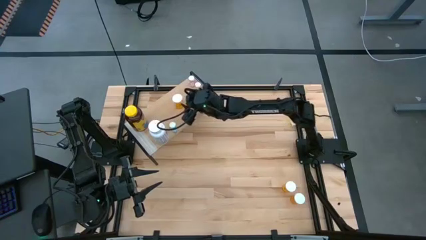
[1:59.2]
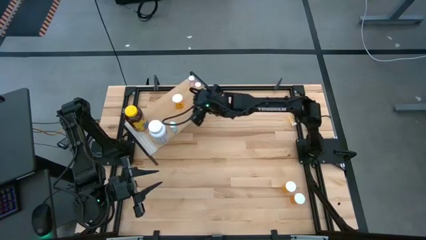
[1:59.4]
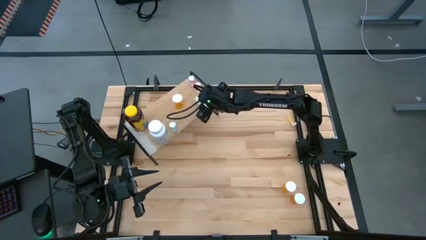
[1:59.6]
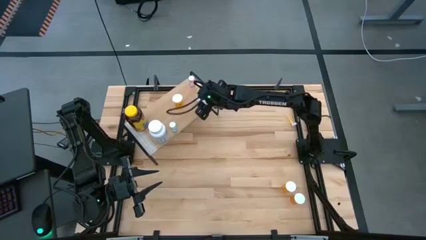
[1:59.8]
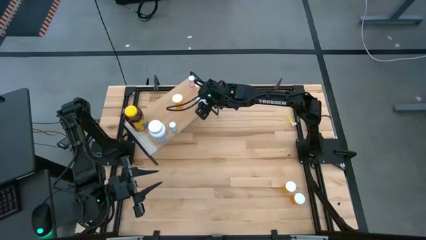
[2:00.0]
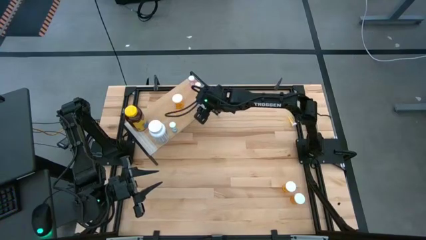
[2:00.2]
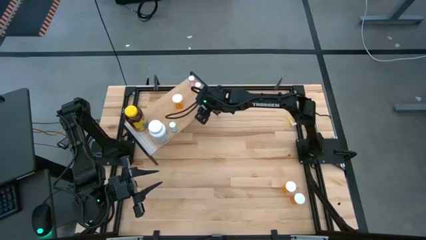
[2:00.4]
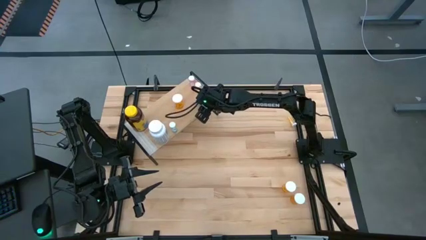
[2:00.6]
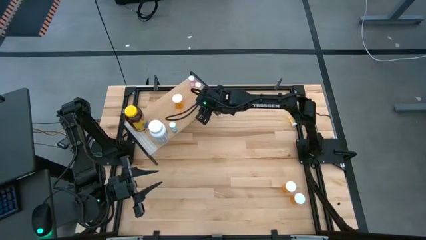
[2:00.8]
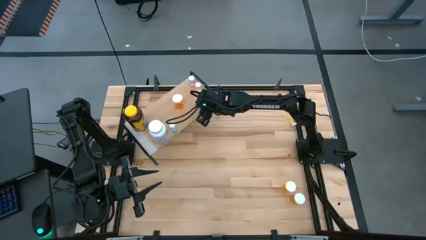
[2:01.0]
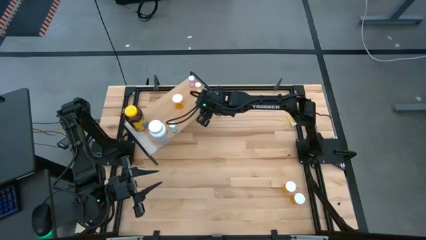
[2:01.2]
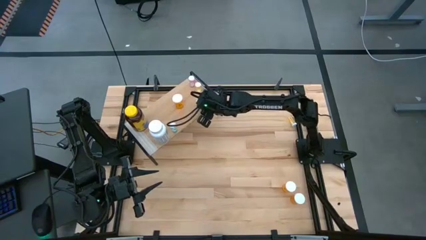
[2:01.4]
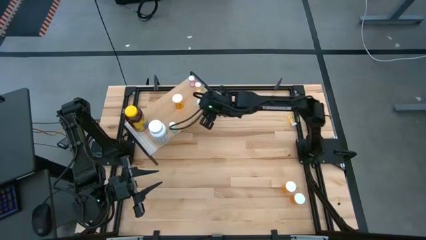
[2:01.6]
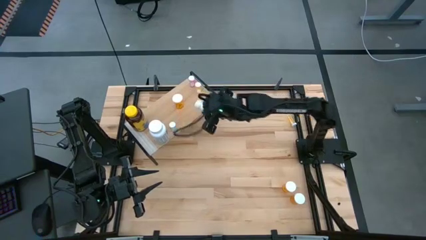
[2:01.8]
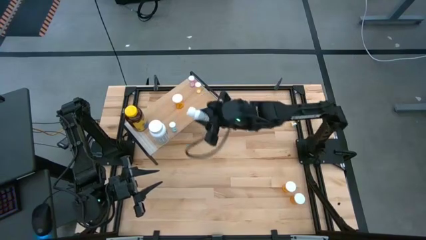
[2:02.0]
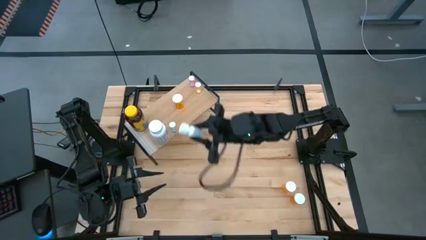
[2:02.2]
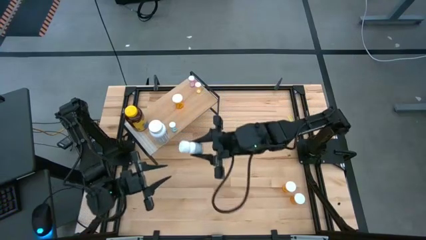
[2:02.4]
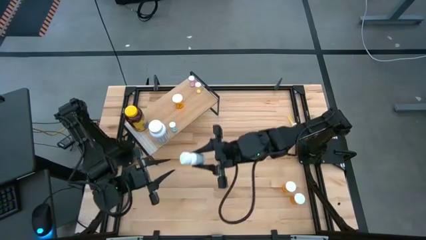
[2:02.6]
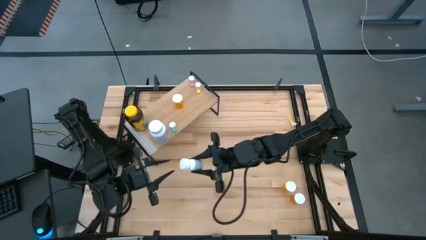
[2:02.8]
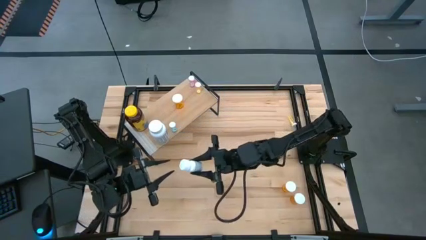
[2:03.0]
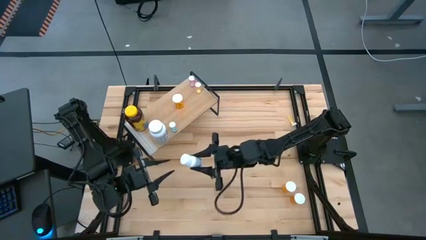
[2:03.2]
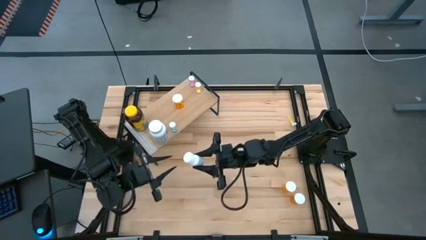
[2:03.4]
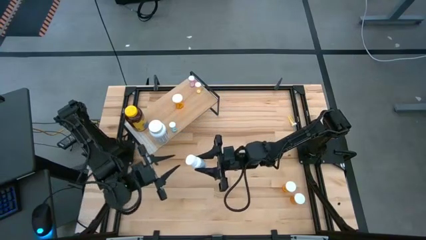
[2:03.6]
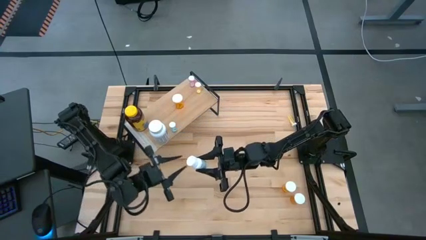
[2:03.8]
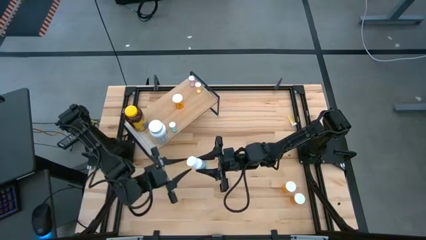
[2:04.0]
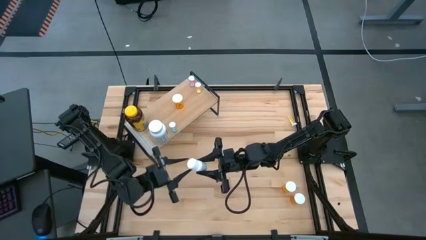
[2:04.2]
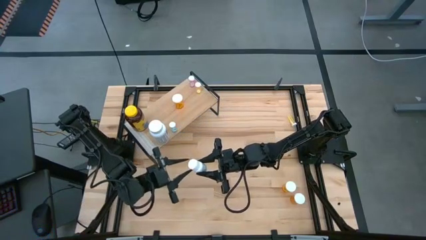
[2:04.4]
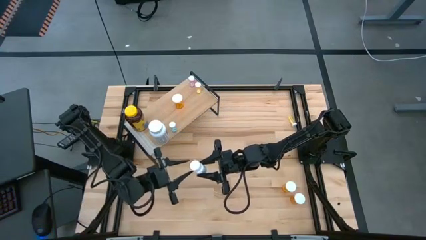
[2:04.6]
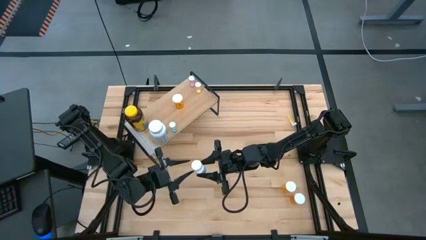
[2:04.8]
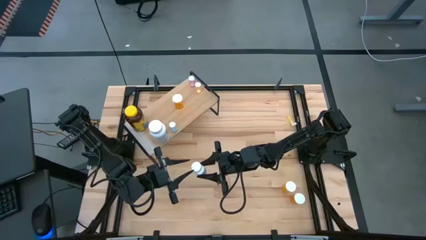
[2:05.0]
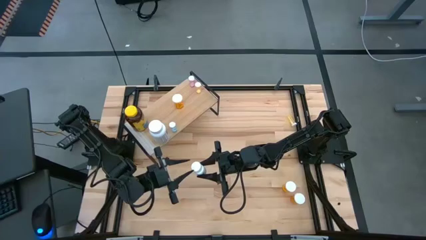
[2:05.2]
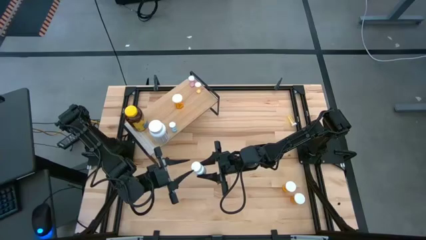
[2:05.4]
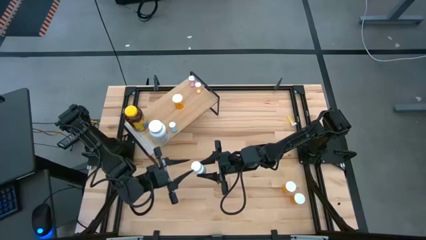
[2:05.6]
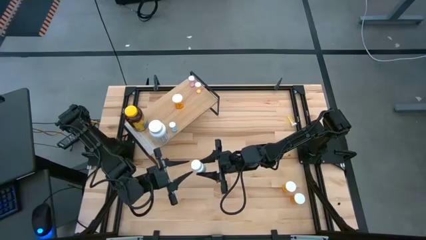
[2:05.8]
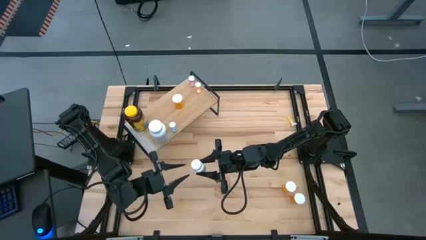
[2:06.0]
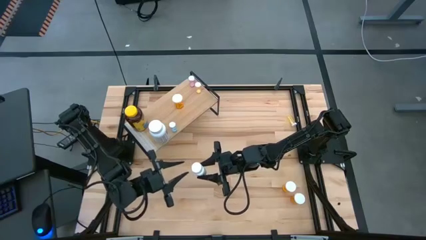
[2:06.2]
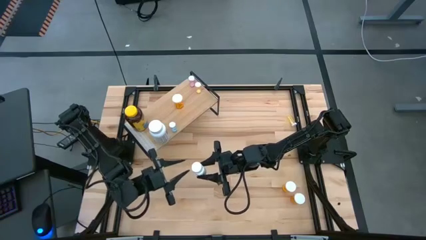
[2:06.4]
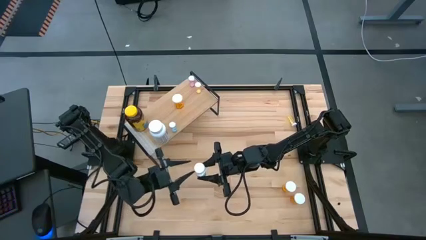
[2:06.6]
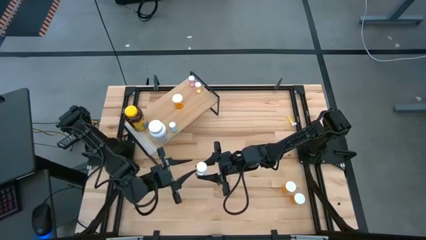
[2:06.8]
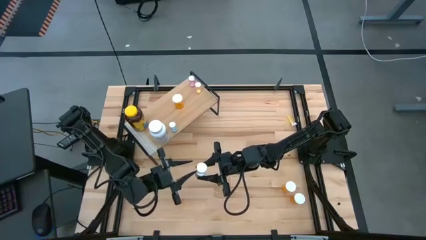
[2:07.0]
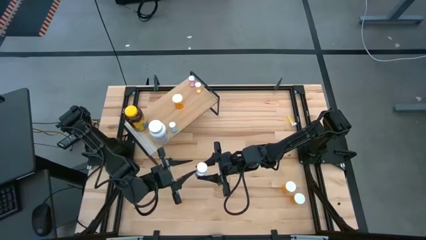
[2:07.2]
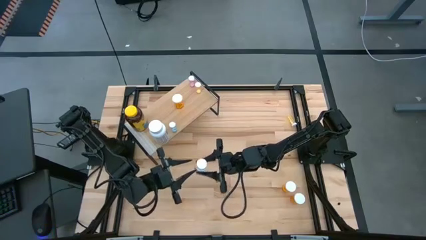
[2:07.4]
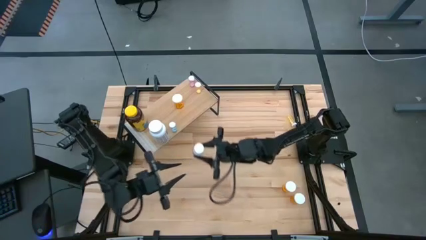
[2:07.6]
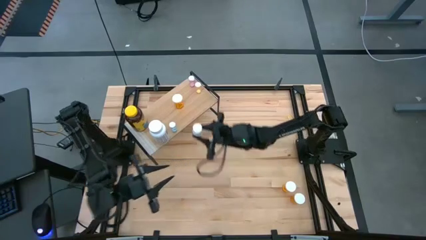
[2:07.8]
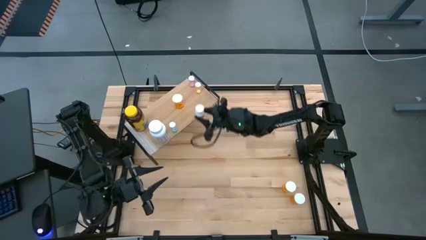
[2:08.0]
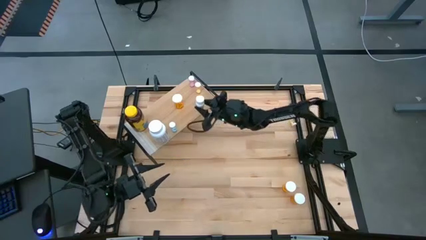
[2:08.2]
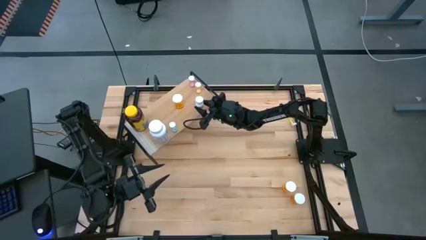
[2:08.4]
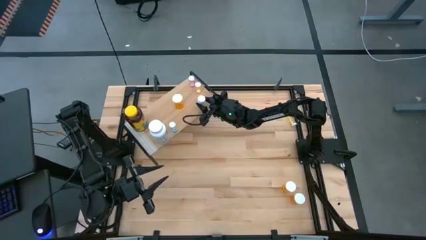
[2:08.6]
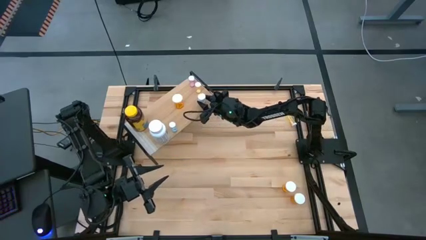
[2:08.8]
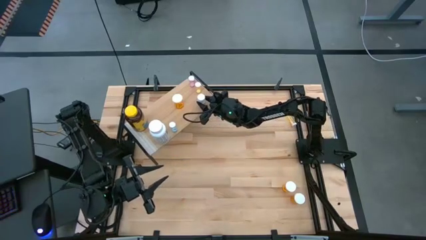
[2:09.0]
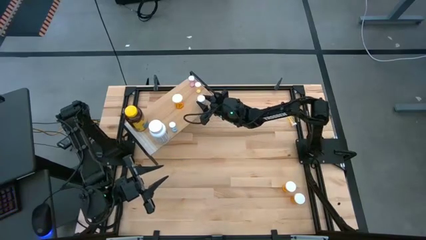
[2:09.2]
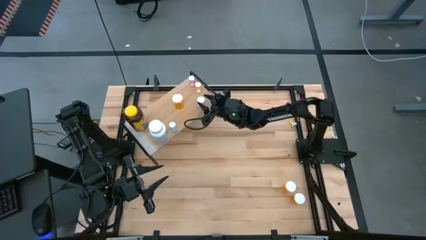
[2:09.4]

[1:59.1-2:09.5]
Task: Pick and place medicine bottles onto shelf by color
Adjust the small white pill bottle on the shelf
